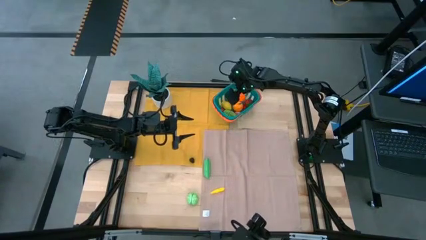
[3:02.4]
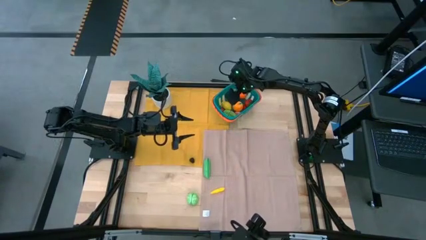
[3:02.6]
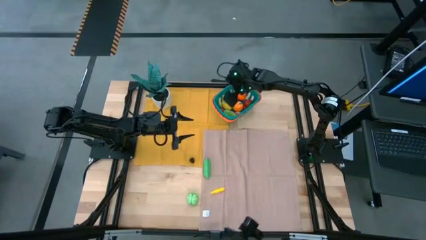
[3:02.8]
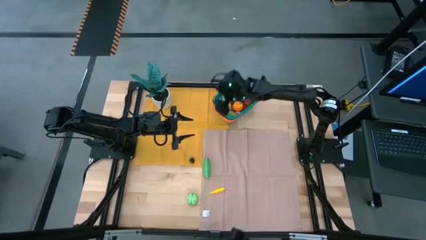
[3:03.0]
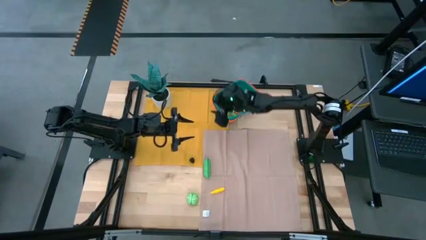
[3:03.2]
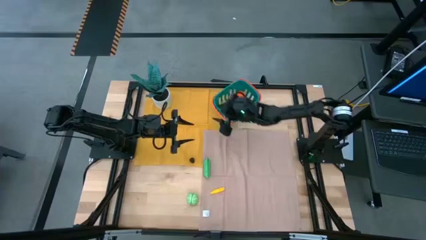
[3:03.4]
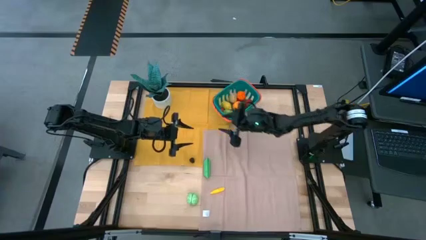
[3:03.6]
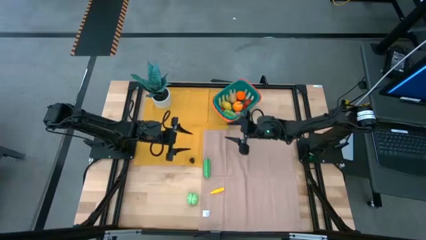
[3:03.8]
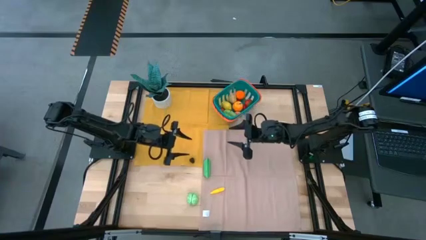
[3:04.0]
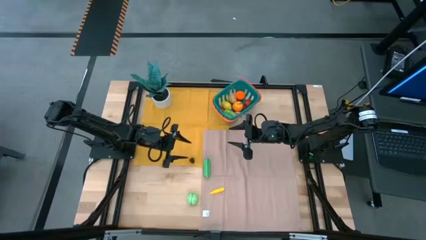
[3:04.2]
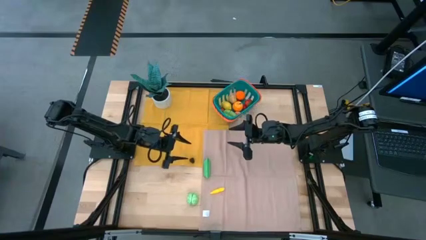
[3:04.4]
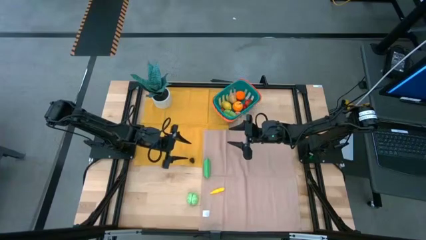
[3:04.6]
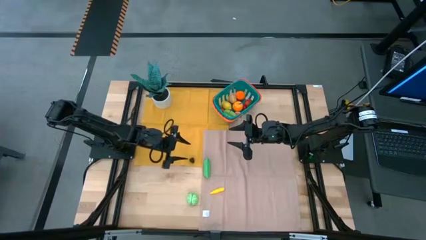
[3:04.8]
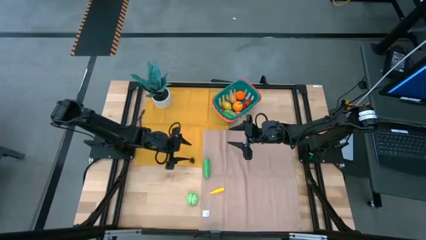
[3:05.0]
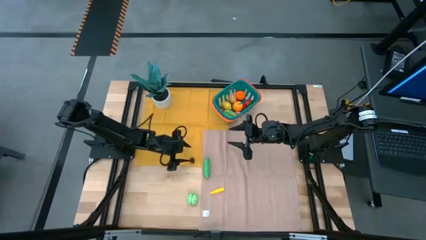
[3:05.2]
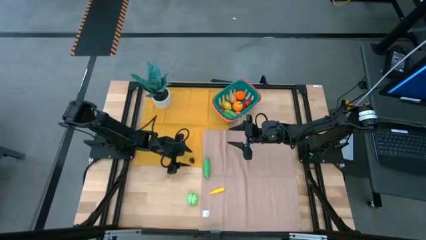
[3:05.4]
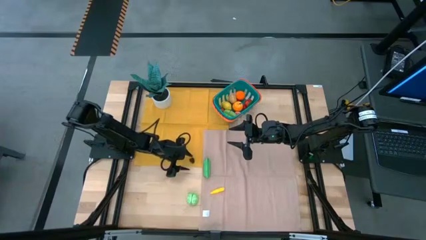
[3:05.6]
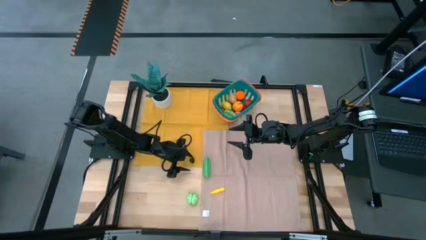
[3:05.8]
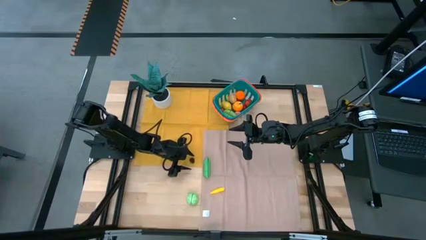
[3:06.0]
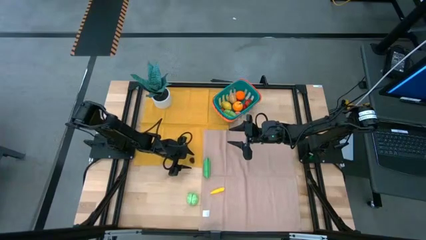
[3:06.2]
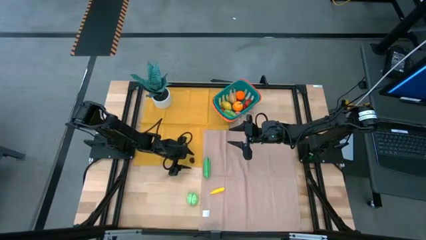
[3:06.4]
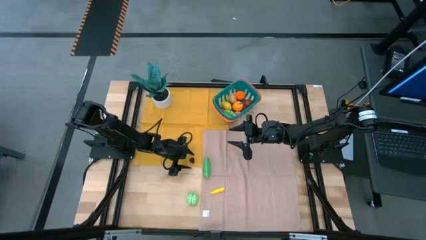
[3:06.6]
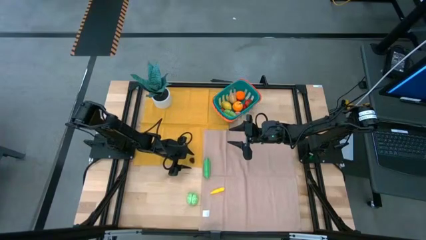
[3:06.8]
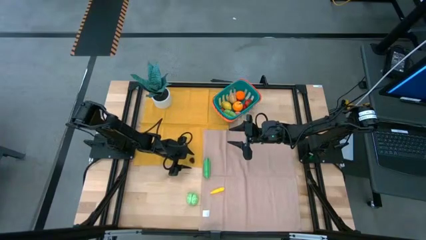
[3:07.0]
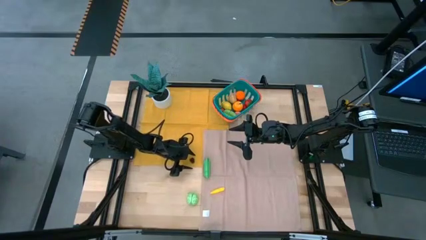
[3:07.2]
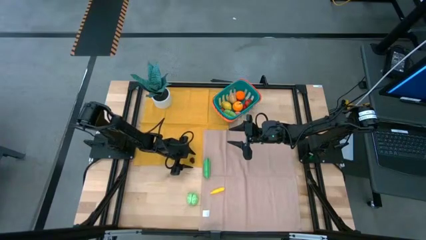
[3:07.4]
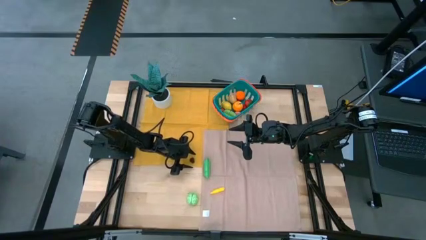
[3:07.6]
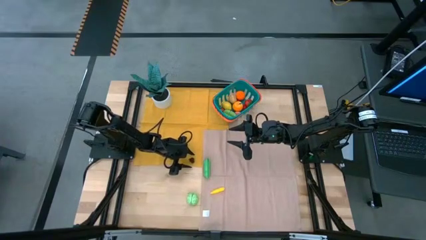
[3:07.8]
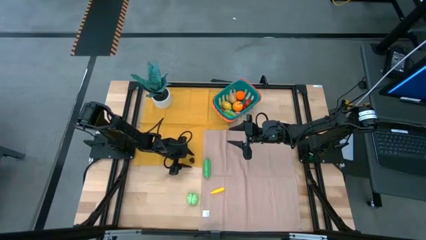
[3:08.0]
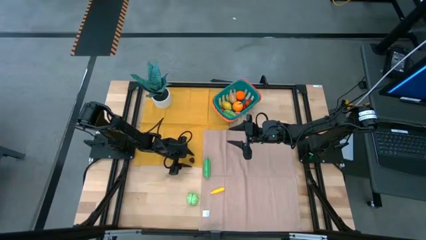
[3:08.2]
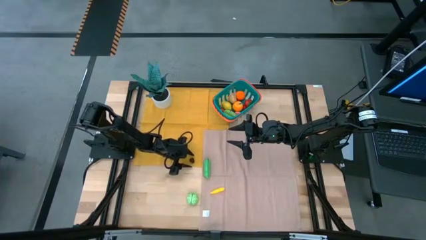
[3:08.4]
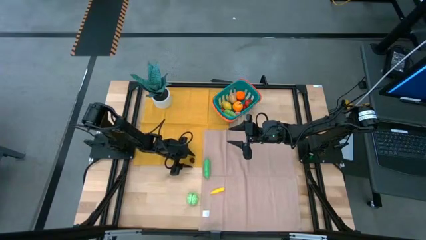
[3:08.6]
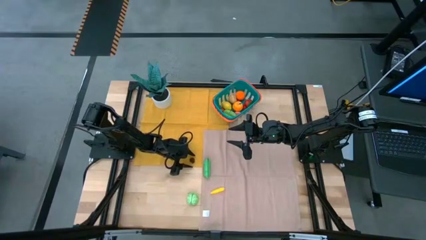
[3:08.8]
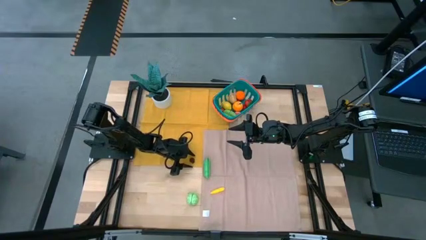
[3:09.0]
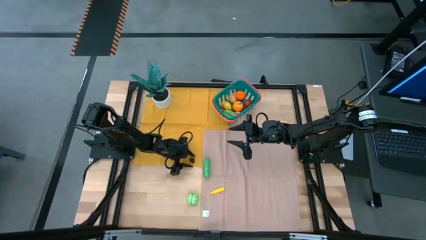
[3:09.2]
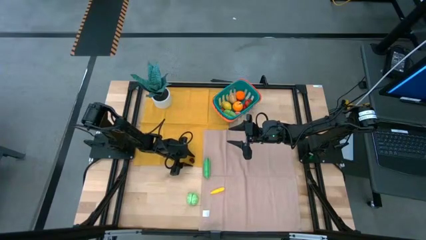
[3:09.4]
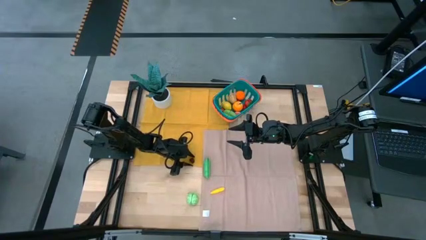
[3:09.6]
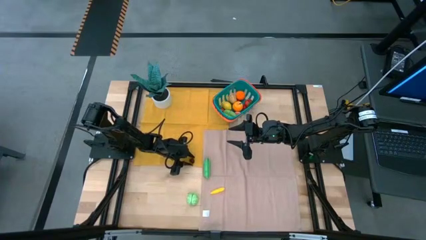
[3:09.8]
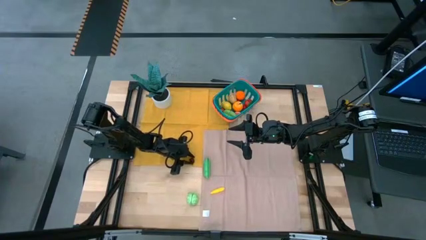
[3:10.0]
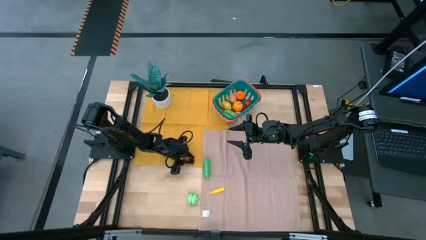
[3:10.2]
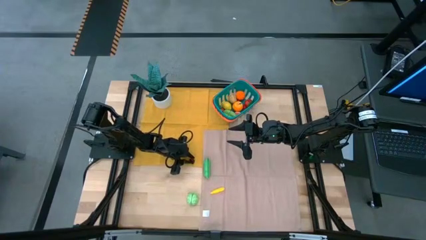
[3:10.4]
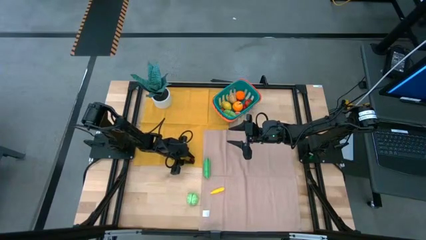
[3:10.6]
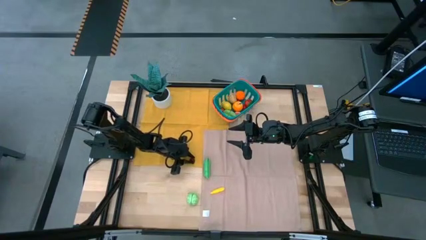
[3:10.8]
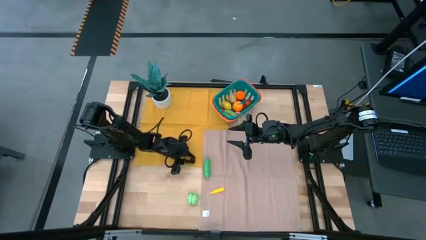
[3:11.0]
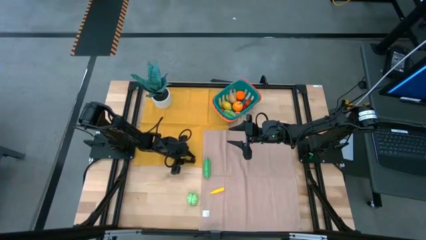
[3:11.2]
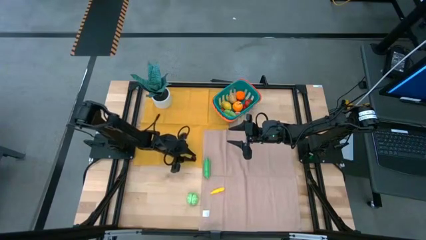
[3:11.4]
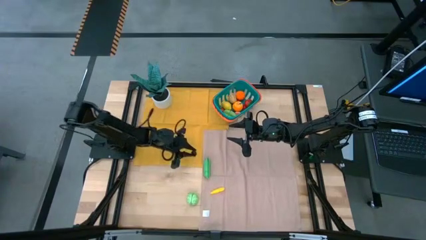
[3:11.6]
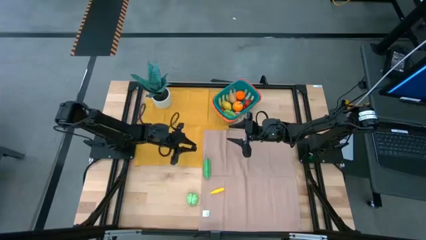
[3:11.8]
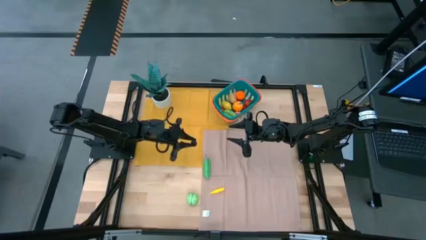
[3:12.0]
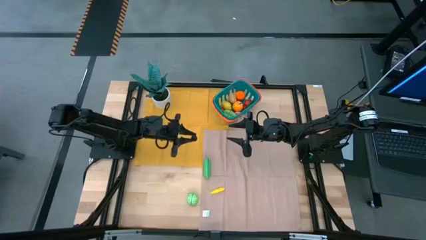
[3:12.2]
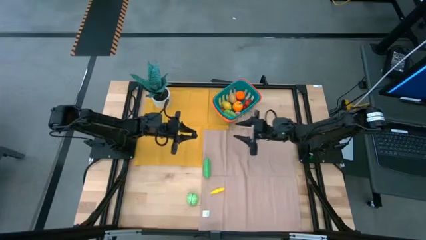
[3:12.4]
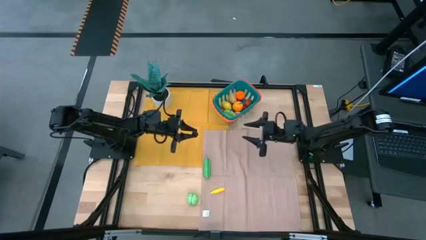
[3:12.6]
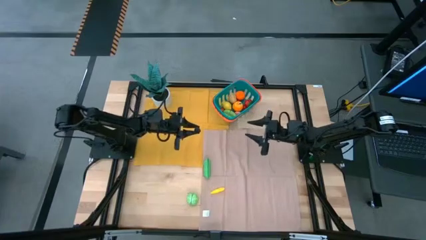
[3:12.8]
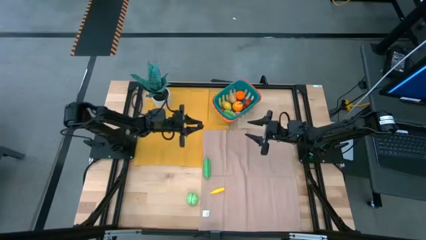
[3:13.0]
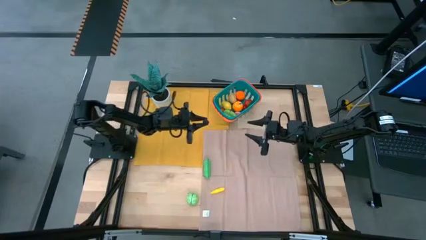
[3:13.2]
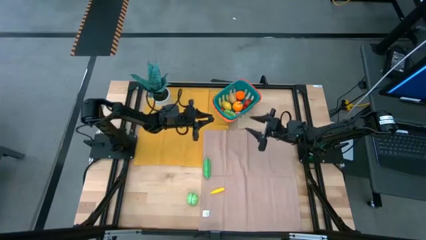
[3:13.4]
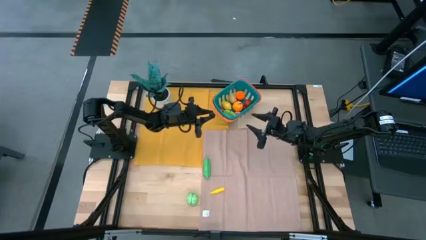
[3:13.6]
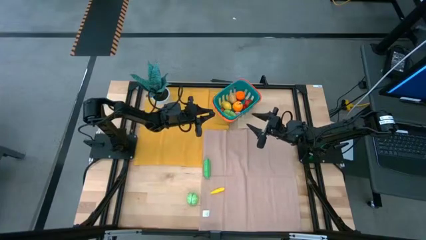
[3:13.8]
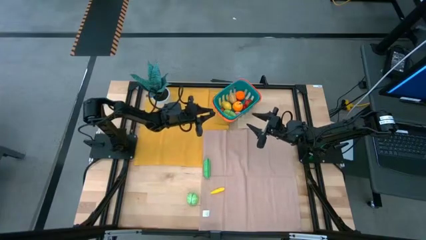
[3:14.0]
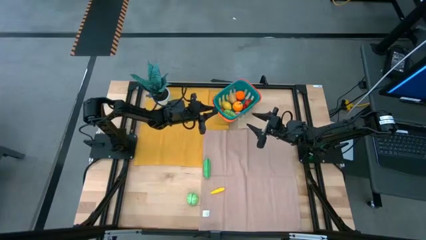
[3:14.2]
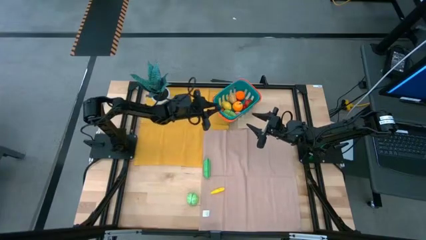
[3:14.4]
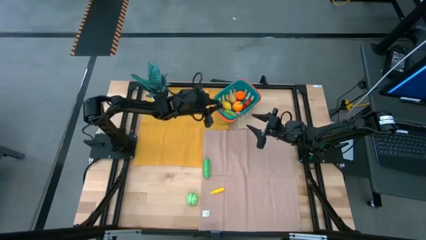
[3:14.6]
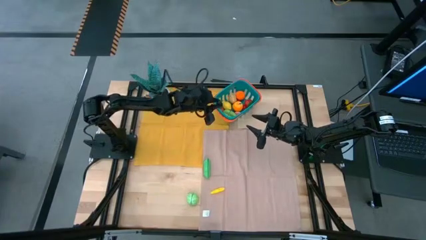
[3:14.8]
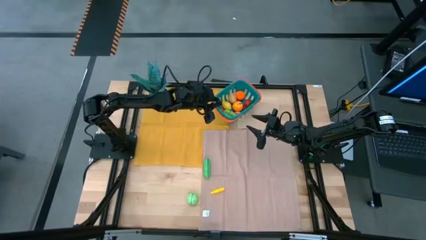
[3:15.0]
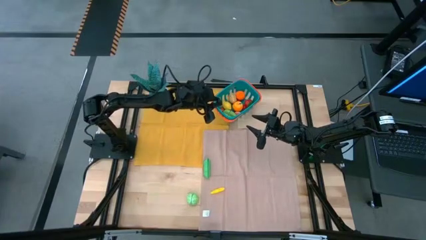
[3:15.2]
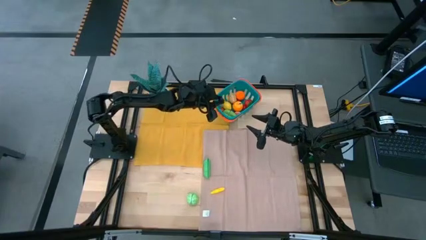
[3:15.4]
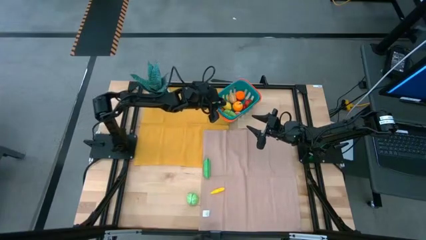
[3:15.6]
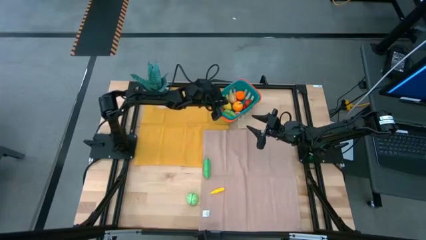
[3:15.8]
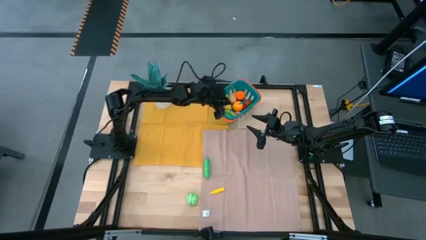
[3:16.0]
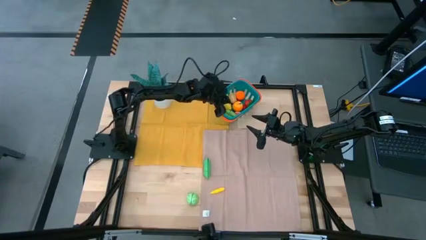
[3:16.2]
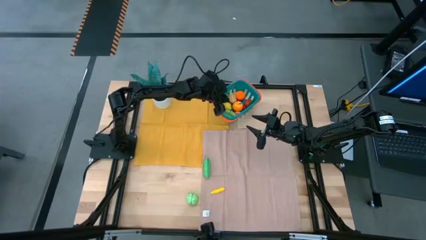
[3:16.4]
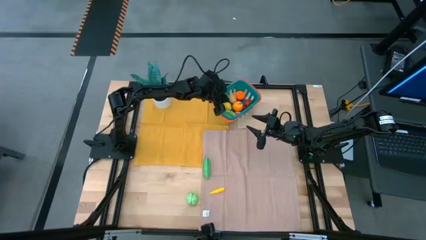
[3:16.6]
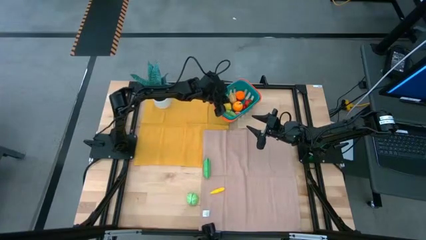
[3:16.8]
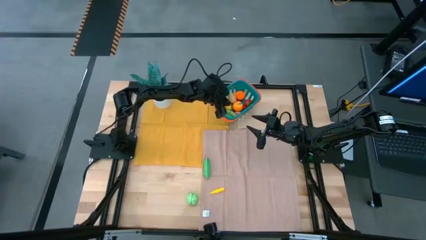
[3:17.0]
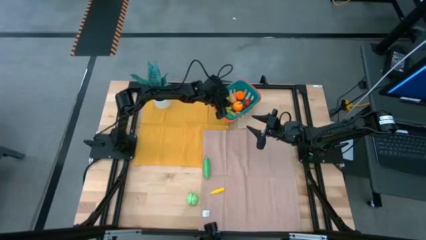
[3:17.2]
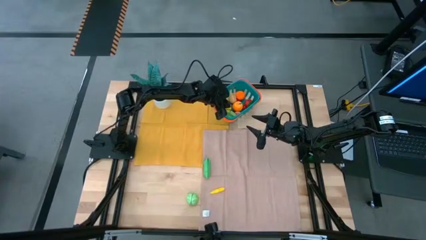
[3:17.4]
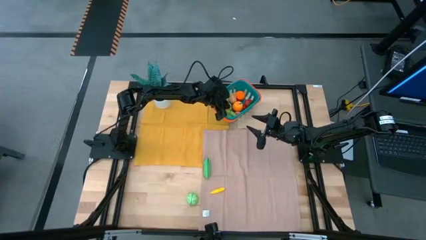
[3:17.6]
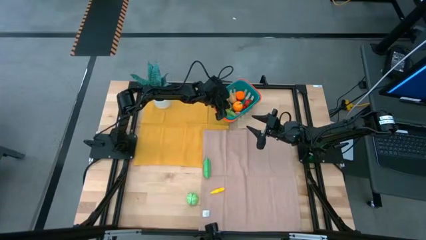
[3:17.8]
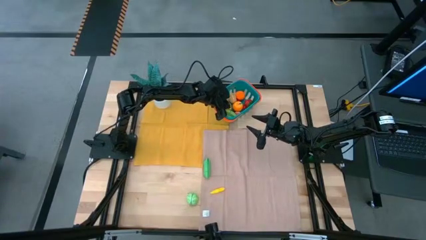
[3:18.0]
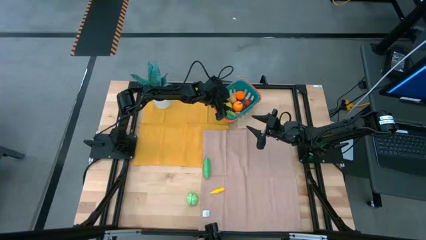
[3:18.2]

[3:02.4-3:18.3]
Task: Pick and placing Produce into tupperware
Put the blackberry into the basket
